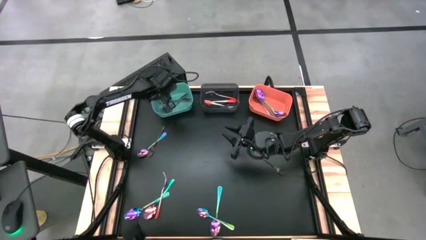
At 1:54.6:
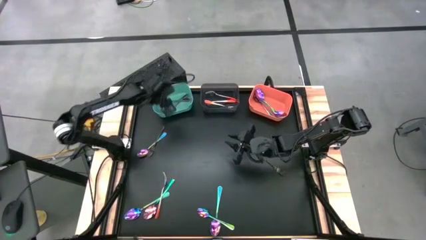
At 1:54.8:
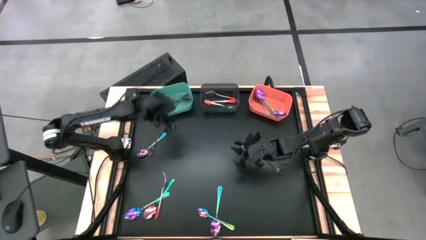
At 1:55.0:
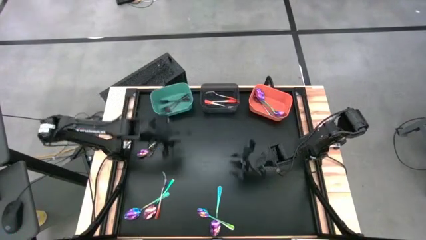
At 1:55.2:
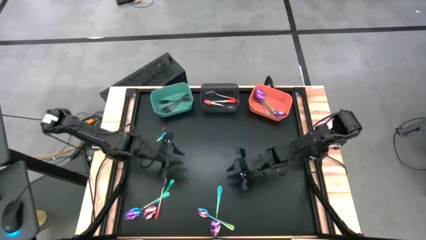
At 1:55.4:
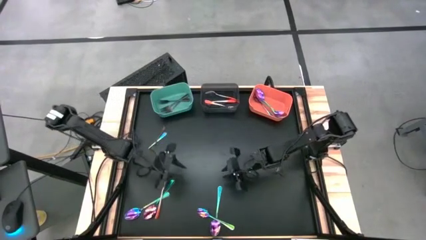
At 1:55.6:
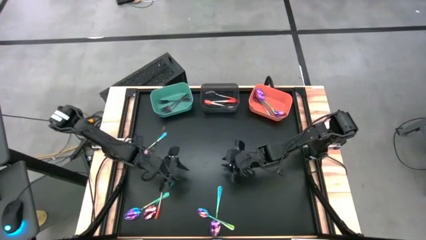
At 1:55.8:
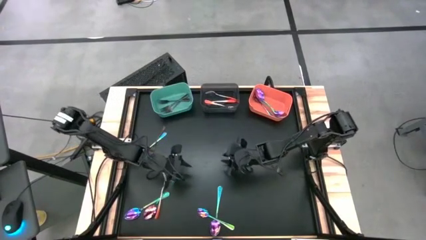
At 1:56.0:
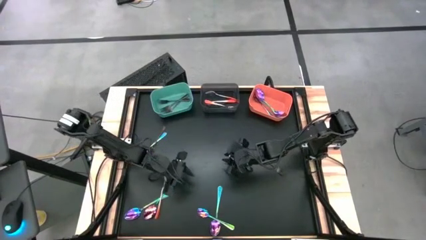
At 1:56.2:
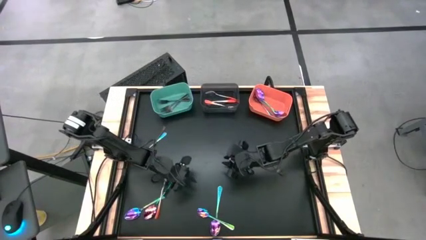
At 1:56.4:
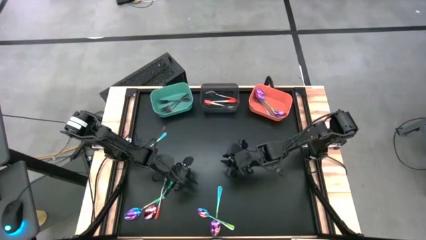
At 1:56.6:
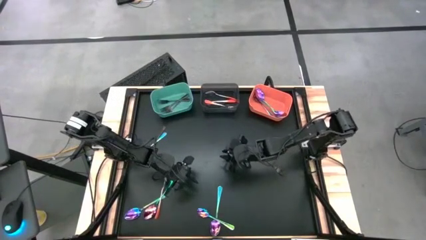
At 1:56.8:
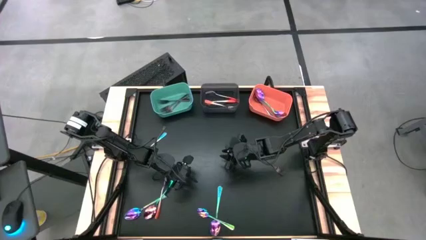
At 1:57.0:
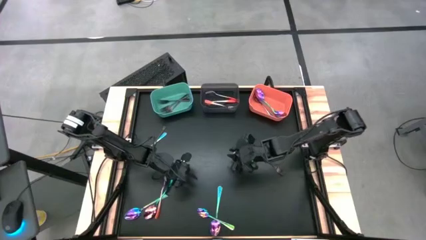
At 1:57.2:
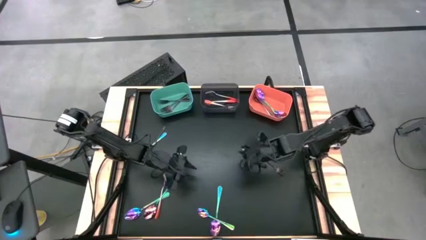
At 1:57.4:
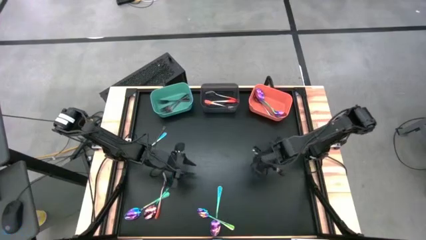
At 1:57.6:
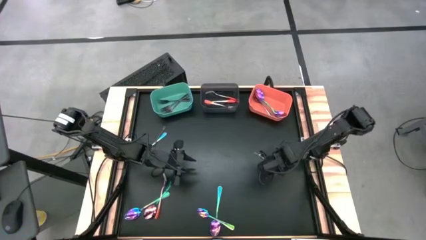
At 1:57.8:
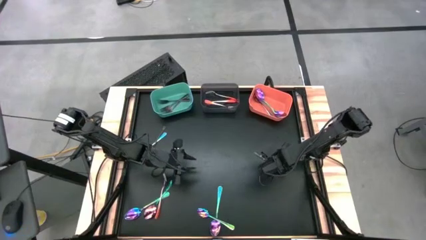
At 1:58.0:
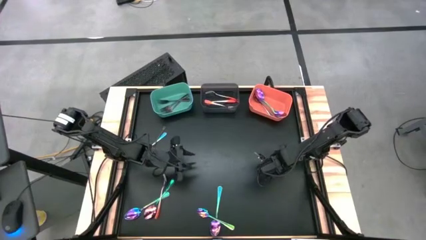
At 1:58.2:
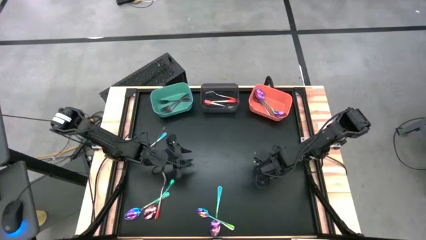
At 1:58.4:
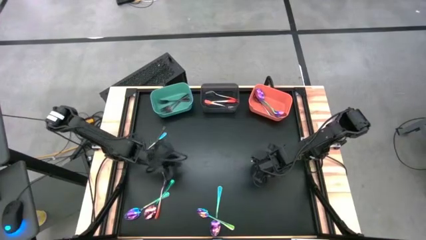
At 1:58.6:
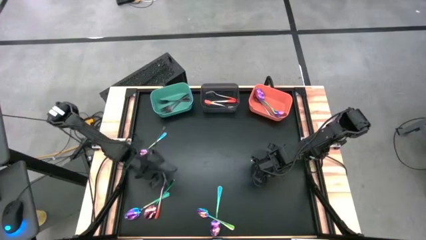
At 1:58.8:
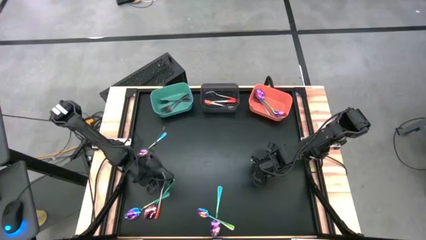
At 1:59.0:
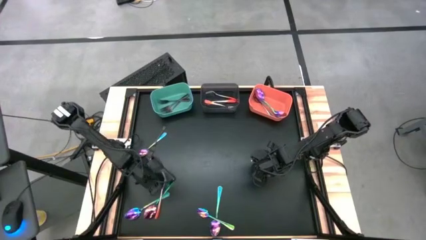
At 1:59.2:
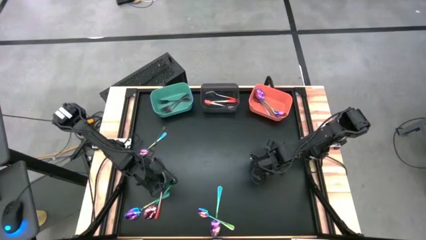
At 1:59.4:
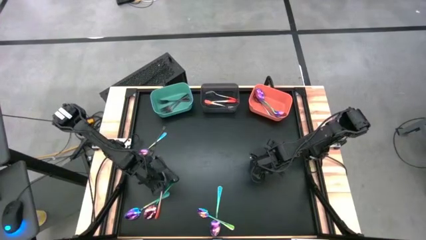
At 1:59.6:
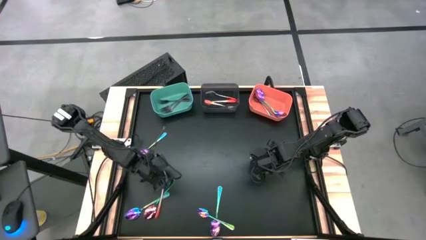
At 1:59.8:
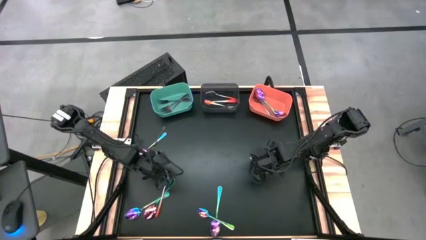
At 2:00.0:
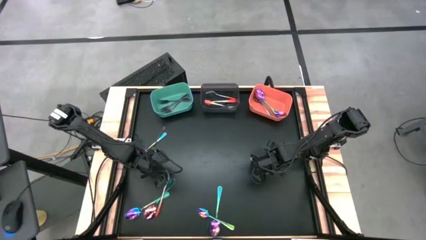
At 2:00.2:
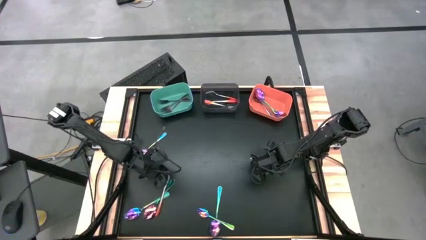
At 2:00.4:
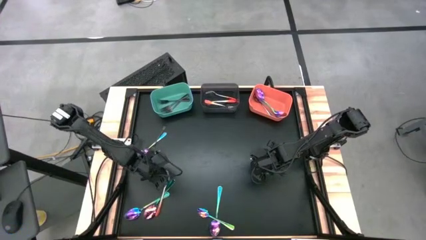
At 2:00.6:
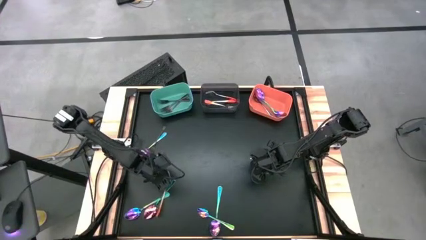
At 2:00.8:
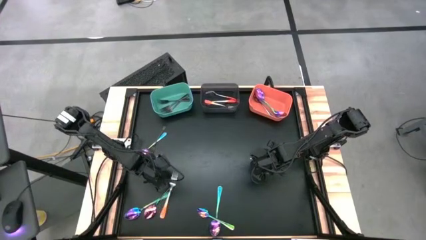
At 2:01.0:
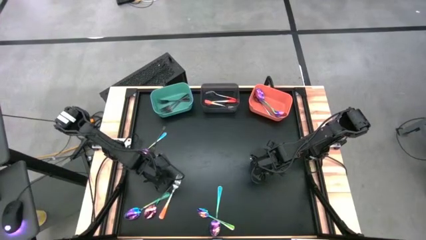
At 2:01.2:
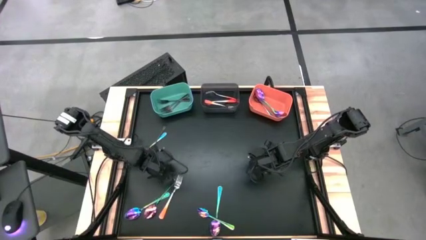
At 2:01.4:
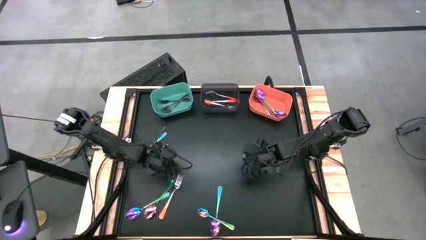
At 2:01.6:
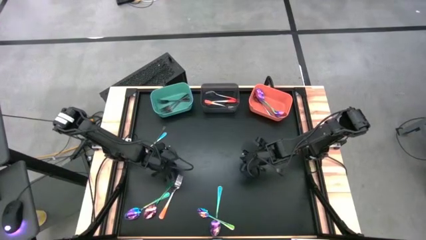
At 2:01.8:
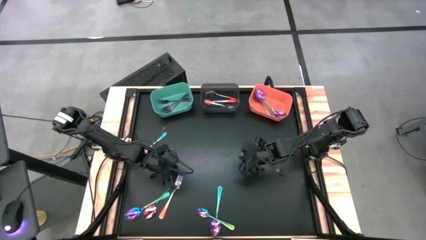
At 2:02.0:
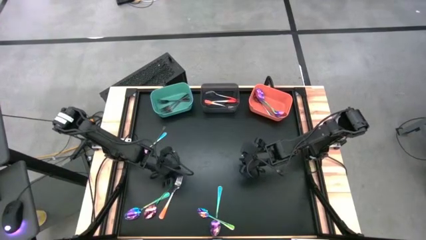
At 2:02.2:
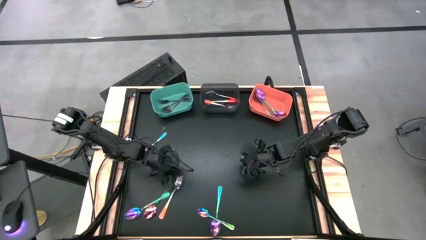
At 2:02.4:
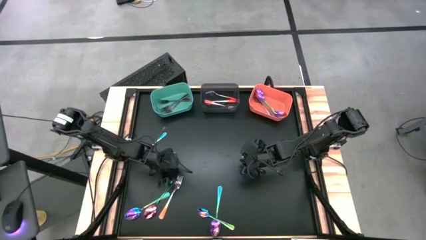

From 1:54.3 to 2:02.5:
Task: Sort silverware by color (type)
Put the orange fork into the black bin

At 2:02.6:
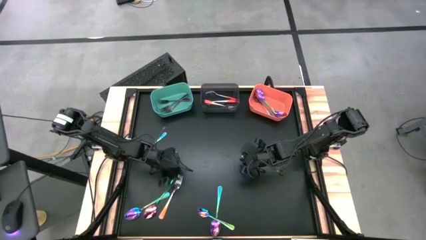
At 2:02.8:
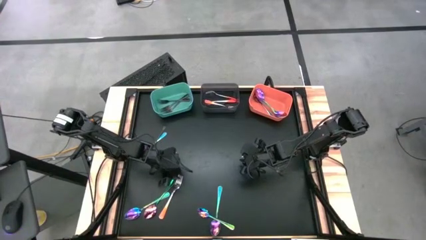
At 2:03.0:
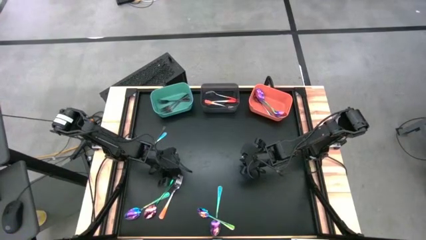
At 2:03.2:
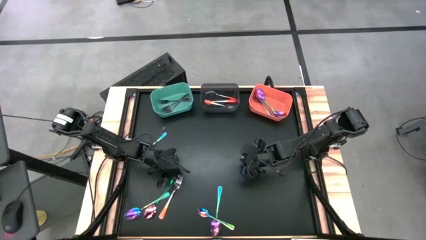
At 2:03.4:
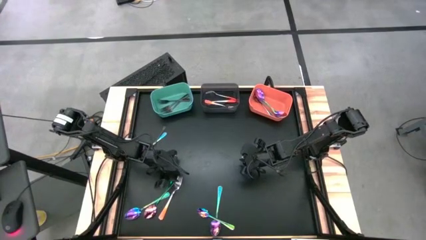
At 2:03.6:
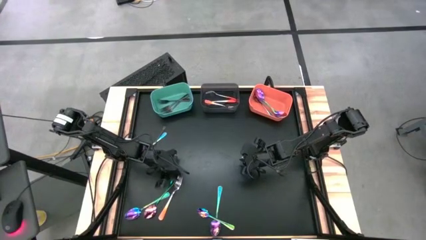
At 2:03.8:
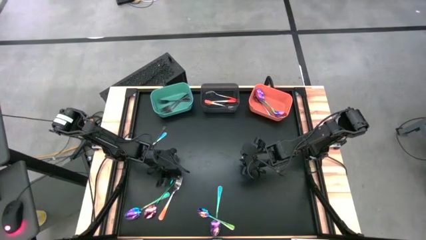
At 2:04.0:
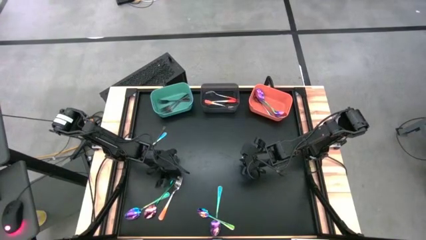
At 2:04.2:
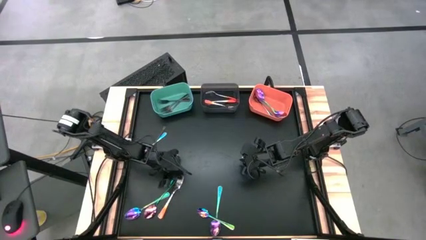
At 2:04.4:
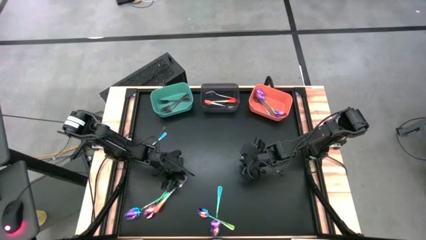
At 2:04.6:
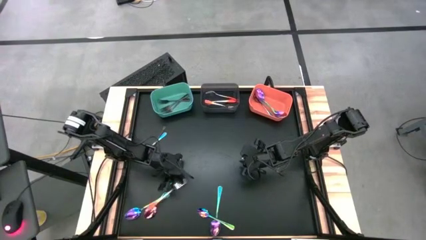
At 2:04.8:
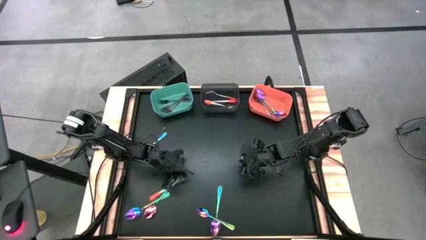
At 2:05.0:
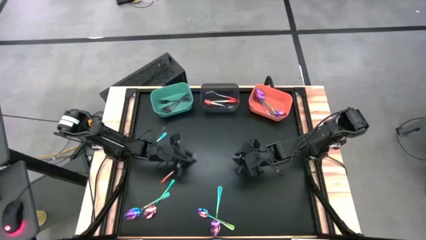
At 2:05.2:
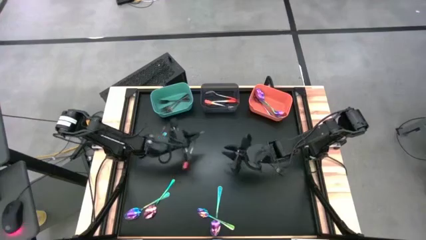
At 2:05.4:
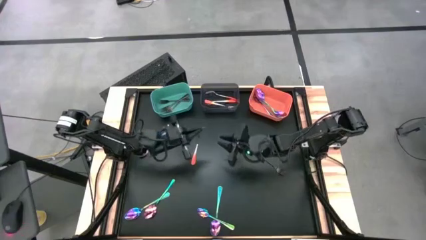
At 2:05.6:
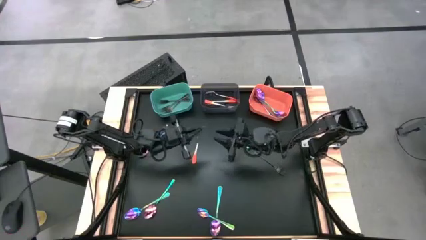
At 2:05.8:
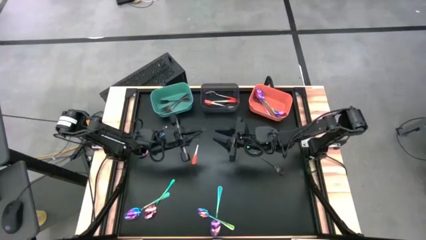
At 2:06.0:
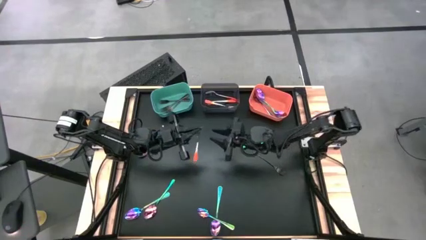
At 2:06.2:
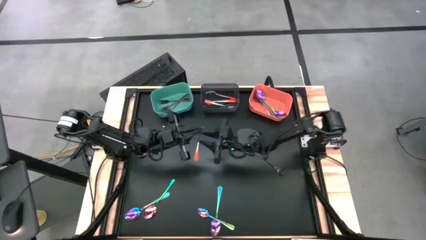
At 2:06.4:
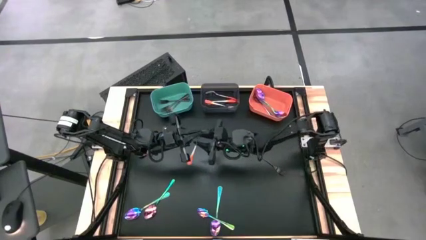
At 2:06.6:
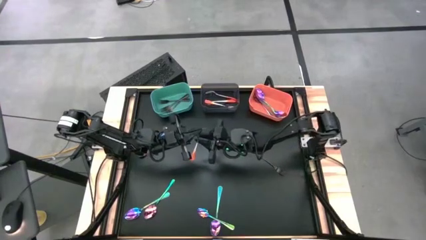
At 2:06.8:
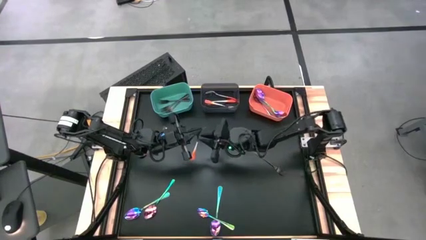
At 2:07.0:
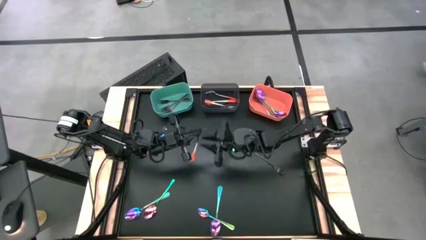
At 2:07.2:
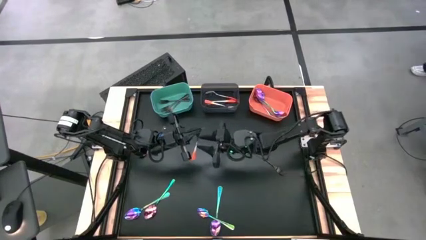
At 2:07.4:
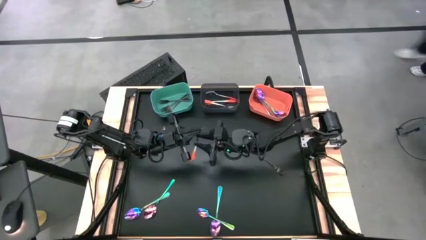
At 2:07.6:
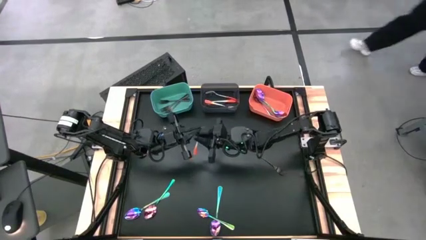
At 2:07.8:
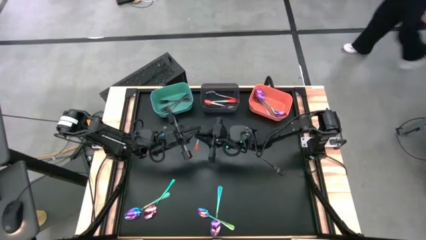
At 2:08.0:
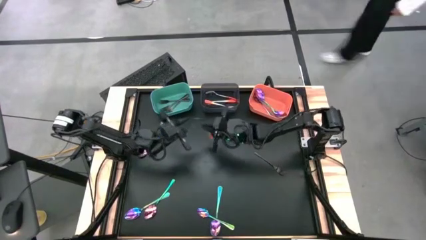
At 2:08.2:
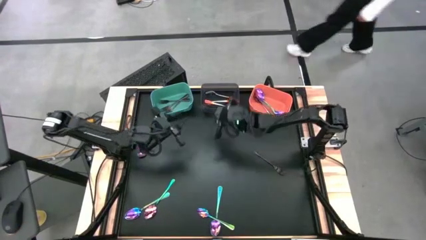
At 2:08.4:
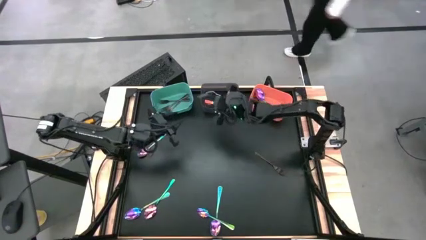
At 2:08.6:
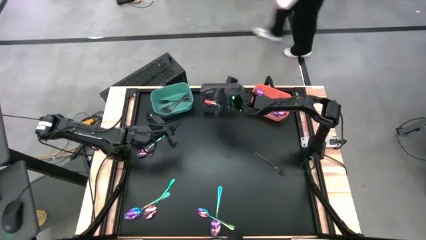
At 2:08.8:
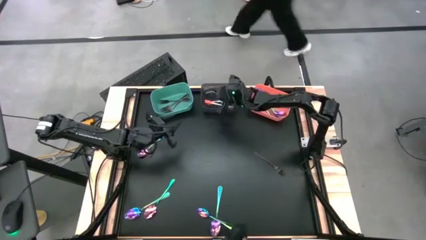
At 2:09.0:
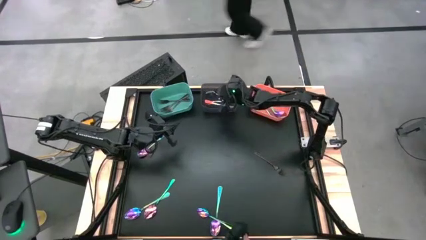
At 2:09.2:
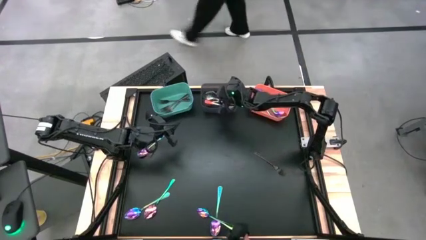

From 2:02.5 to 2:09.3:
Put the orange fork into the black bin

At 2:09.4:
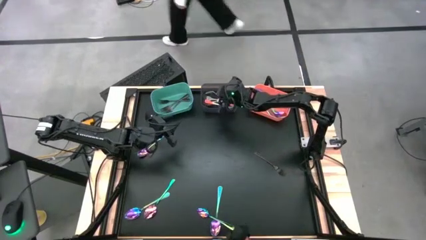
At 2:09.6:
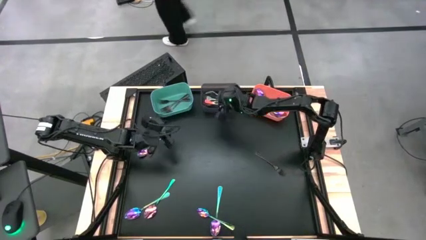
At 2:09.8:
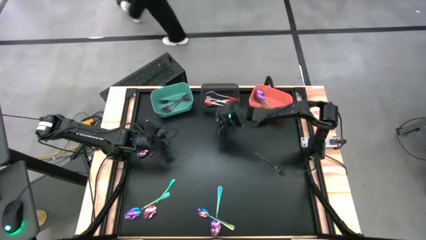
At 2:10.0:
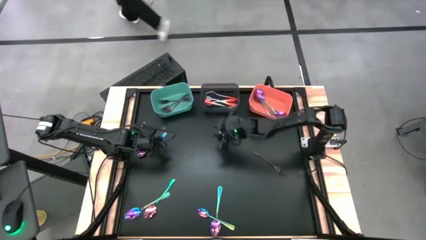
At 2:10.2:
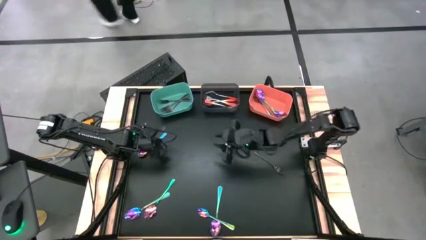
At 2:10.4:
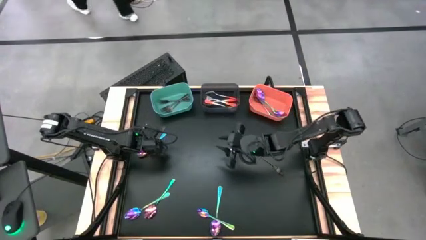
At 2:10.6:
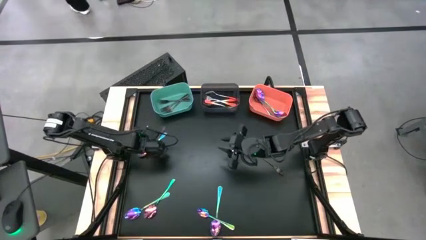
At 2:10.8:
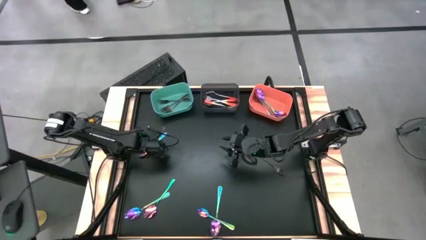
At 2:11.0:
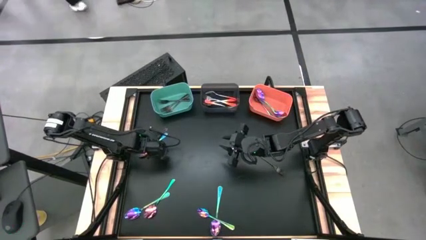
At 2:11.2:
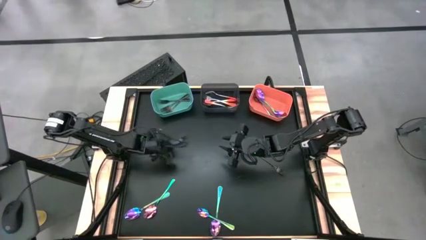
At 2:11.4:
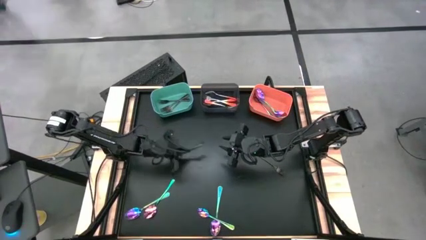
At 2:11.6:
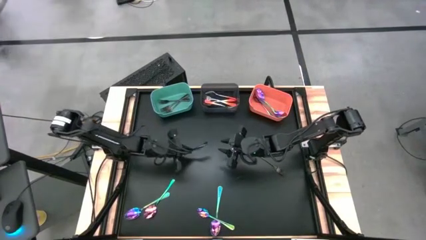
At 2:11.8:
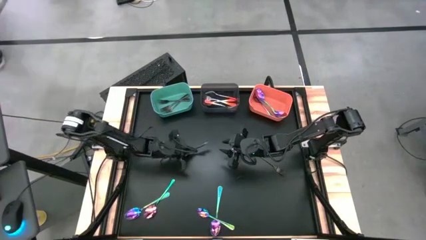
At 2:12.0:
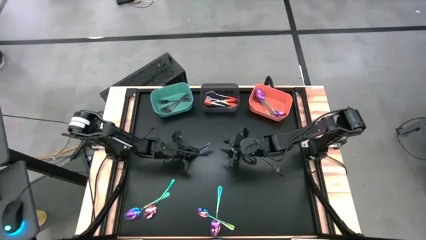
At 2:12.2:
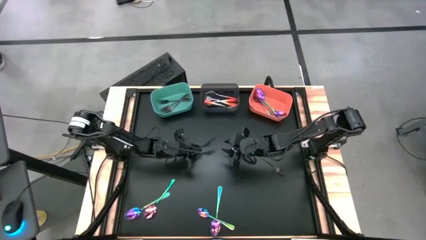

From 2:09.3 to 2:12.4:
Put the blue spoon into the orange bin
